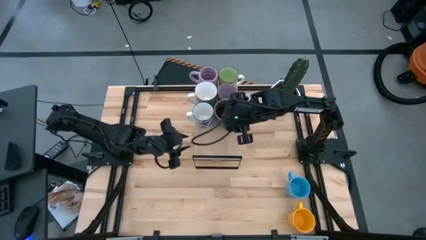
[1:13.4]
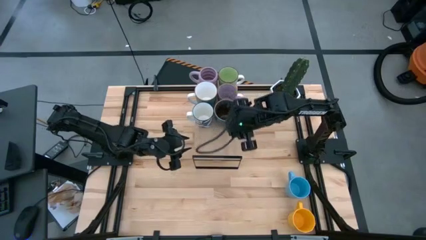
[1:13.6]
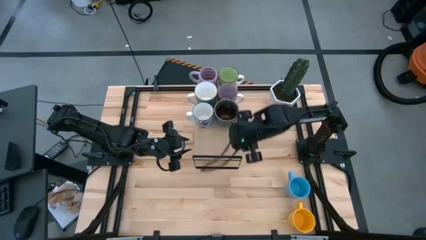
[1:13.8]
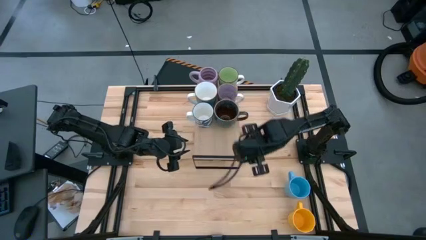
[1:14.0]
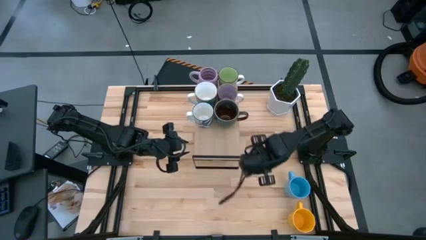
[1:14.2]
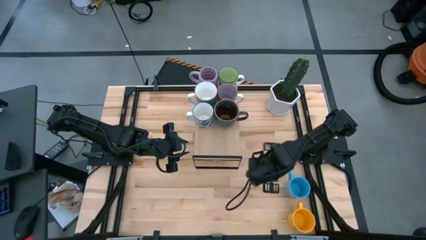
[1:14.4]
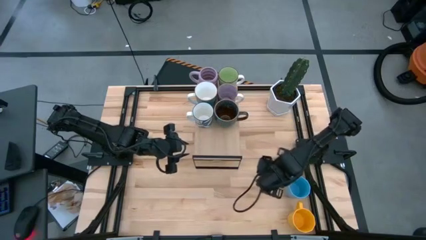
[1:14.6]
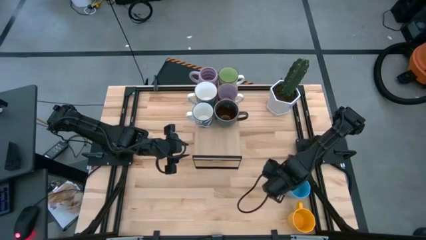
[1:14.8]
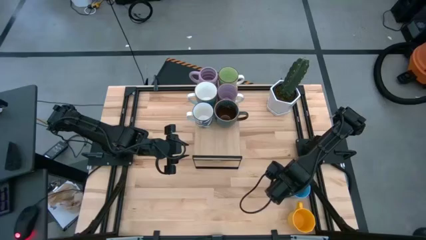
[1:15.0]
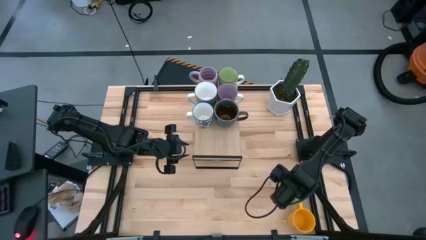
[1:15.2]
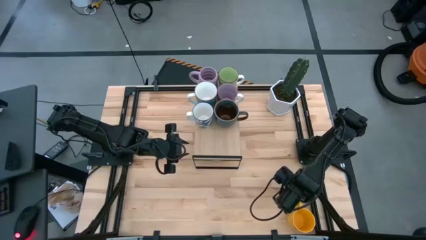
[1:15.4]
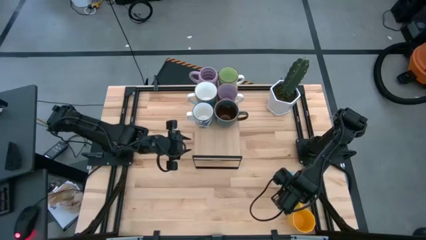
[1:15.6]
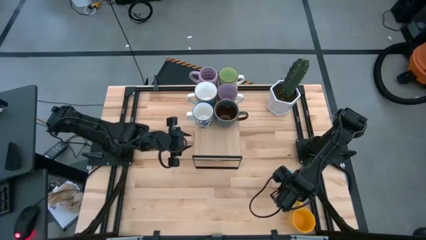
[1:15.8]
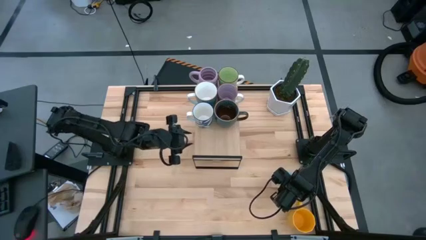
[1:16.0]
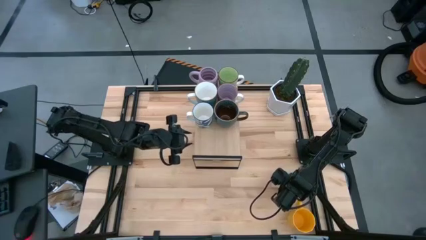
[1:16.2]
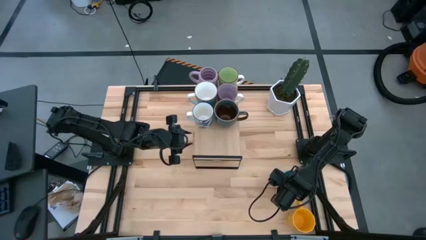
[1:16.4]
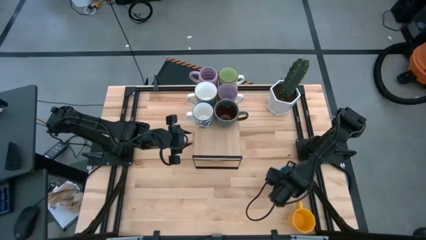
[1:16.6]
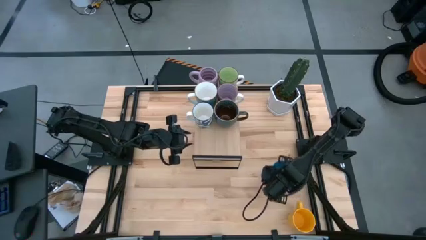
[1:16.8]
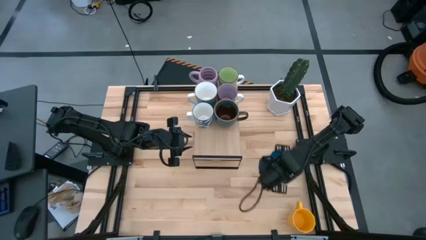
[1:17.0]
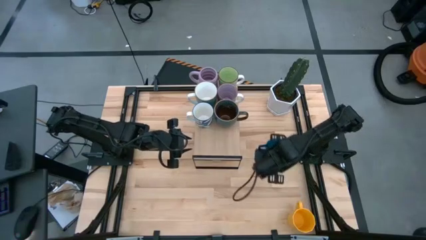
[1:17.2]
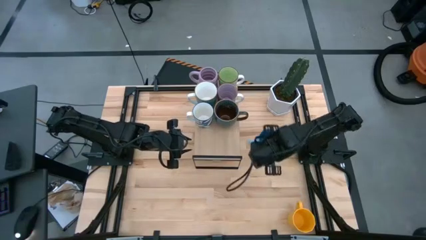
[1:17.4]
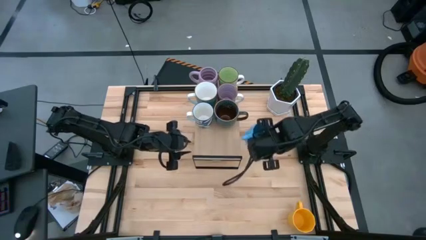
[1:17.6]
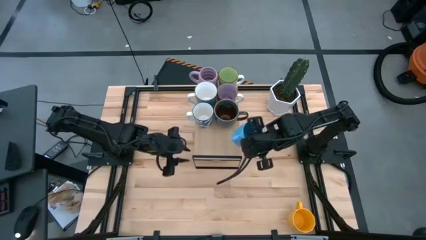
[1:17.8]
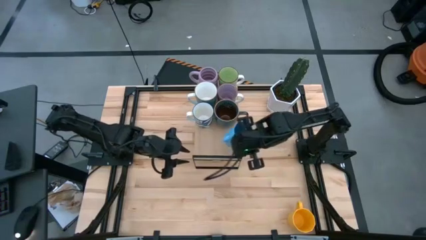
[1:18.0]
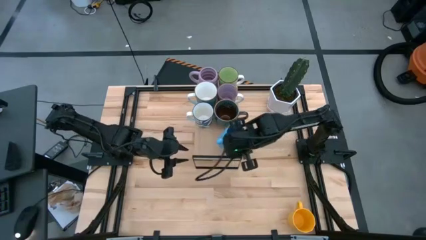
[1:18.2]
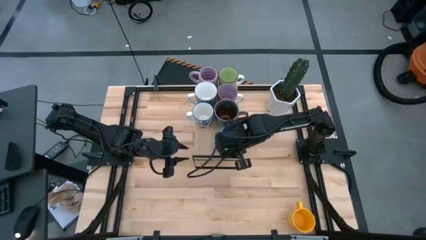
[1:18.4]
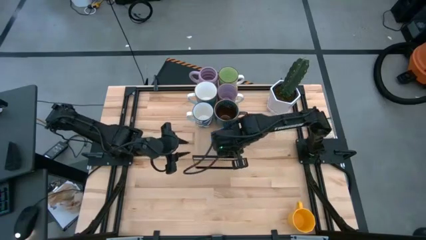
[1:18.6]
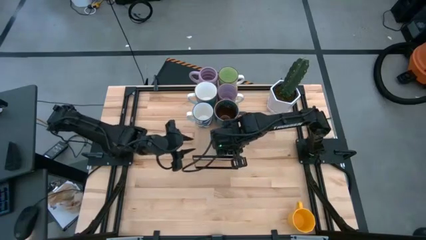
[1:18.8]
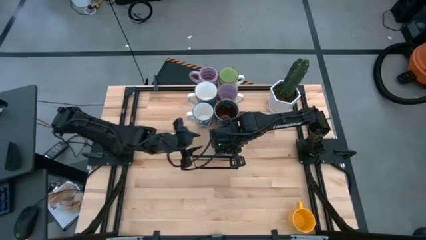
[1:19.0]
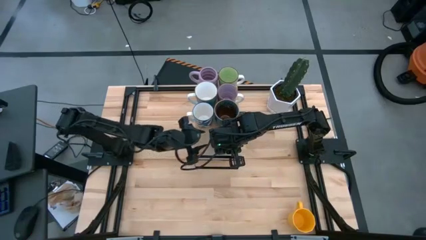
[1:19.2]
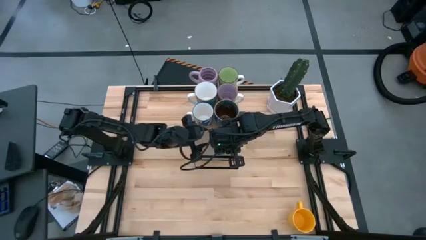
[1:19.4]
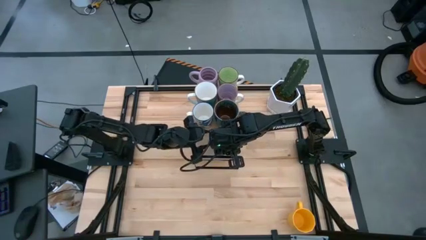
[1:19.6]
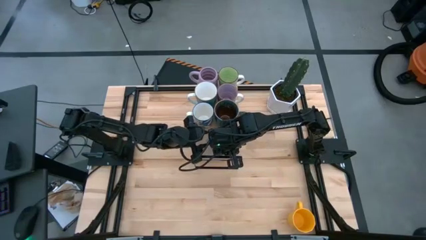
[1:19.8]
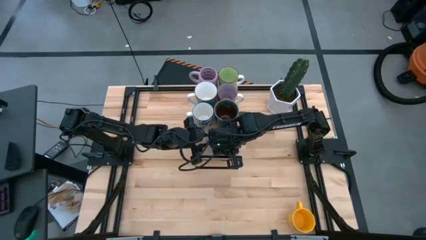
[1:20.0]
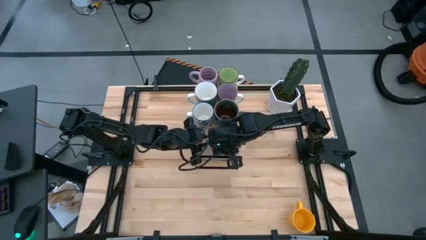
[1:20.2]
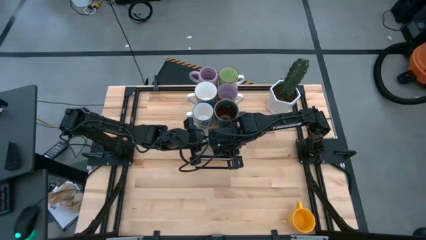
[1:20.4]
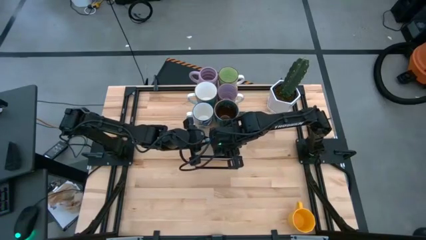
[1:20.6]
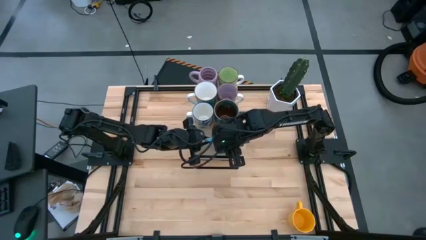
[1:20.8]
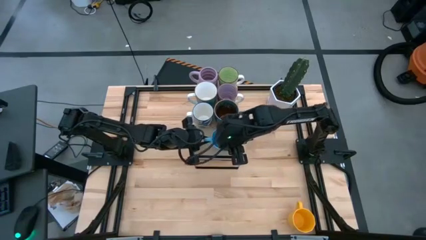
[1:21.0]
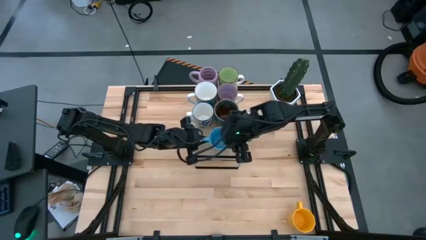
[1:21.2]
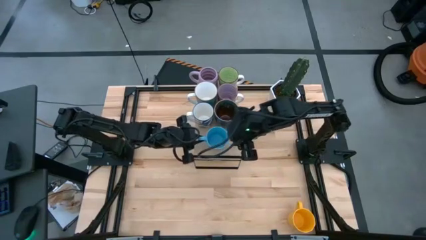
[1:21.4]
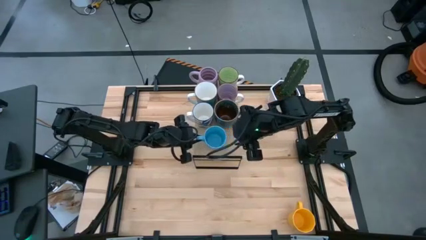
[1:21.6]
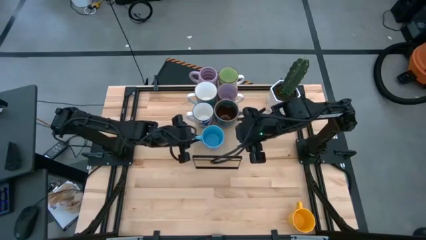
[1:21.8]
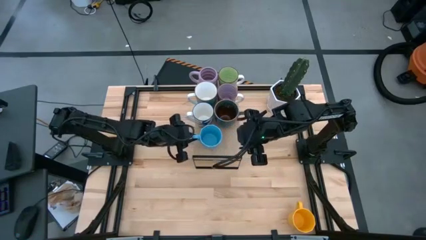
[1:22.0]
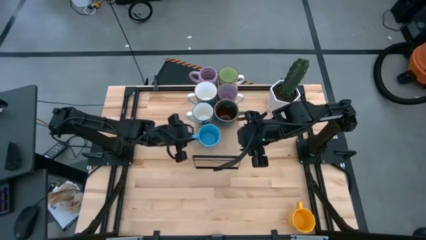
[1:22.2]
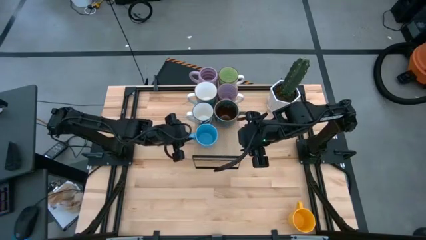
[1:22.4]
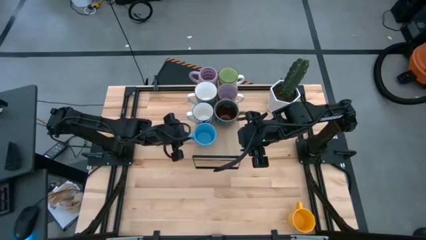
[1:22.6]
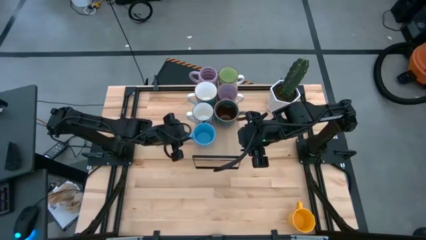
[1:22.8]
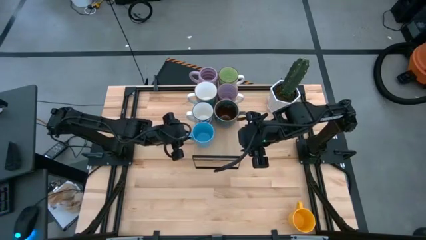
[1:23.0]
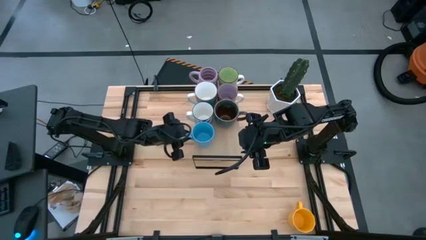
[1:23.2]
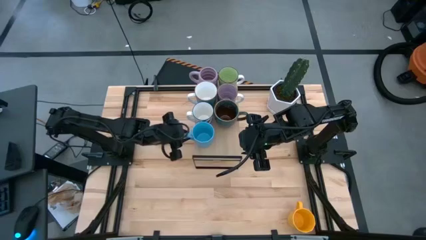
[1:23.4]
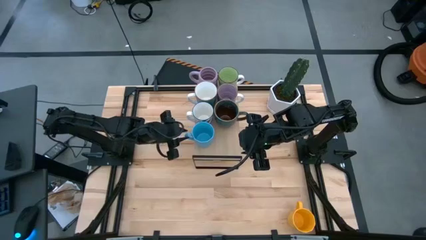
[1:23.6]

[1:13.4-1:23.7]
Task: Place coffee mugs
Put the blue mug on the shelf

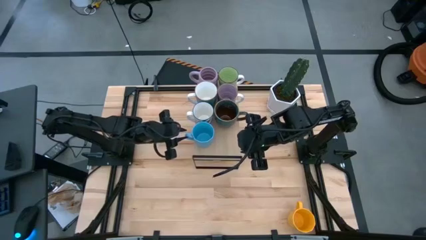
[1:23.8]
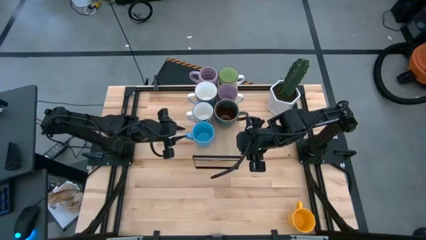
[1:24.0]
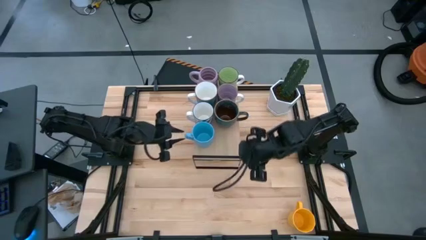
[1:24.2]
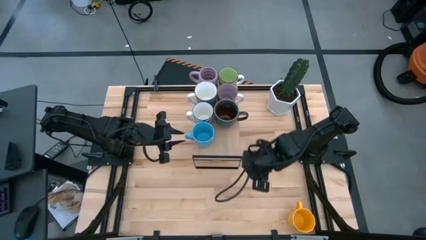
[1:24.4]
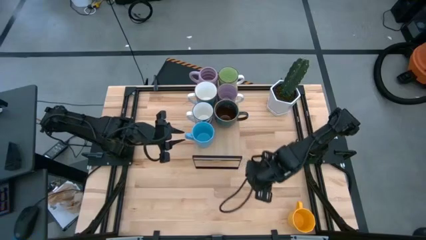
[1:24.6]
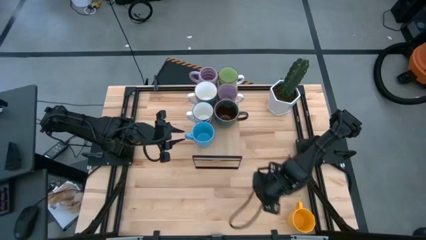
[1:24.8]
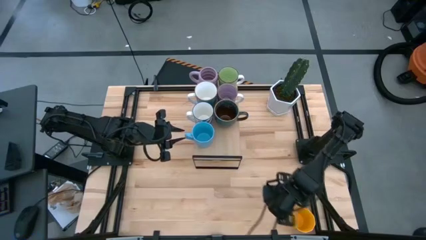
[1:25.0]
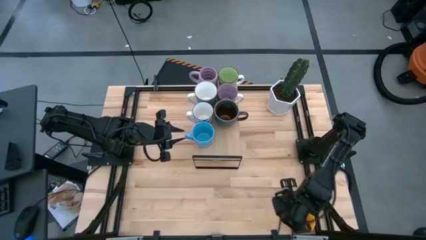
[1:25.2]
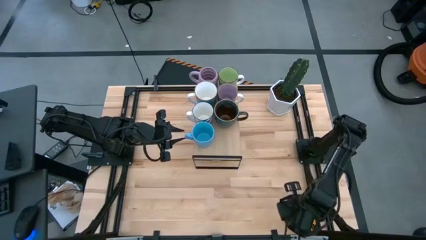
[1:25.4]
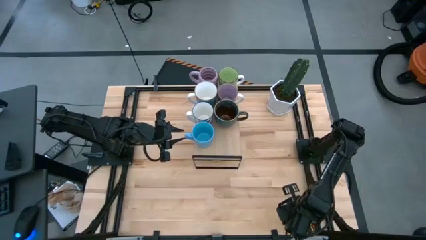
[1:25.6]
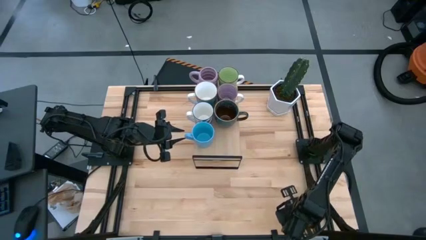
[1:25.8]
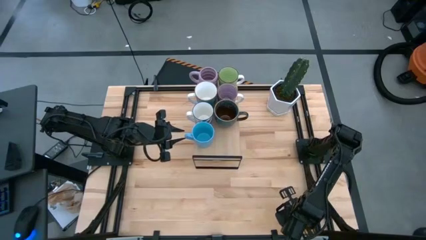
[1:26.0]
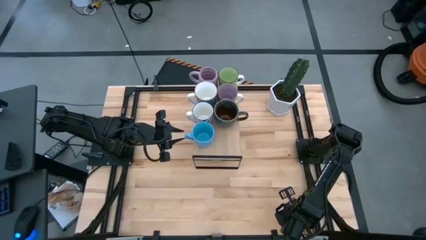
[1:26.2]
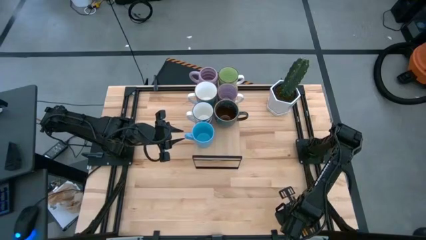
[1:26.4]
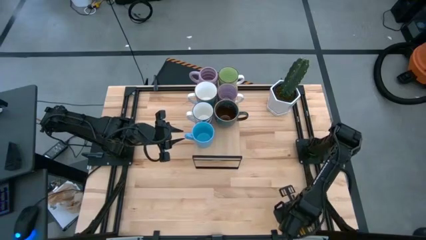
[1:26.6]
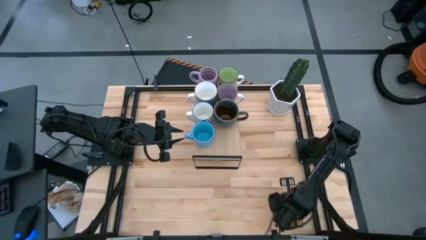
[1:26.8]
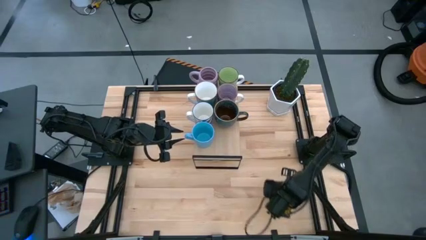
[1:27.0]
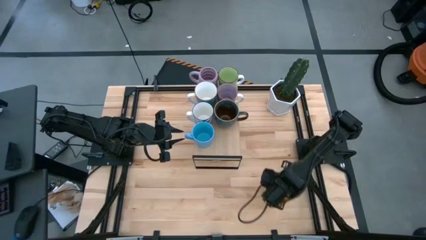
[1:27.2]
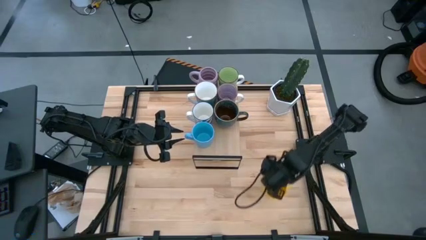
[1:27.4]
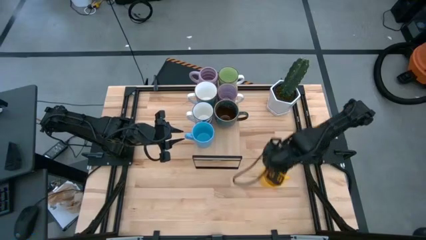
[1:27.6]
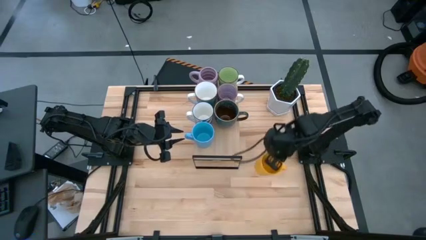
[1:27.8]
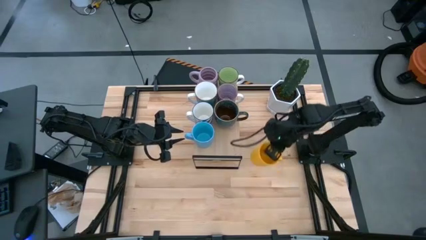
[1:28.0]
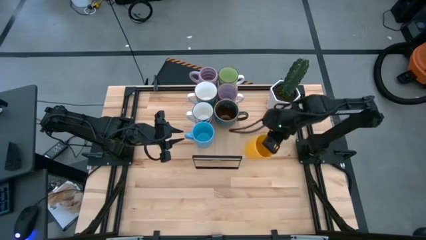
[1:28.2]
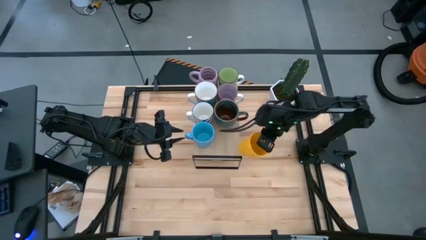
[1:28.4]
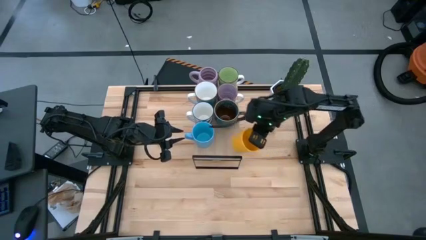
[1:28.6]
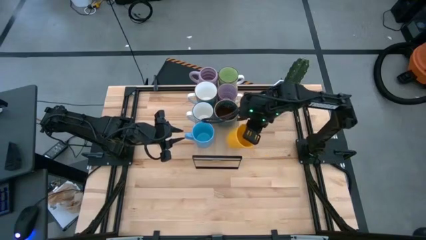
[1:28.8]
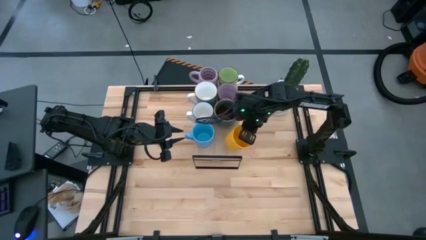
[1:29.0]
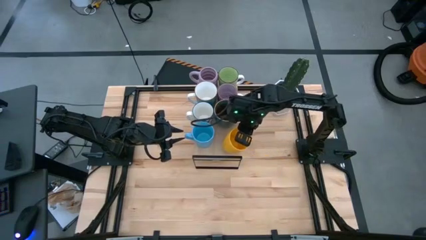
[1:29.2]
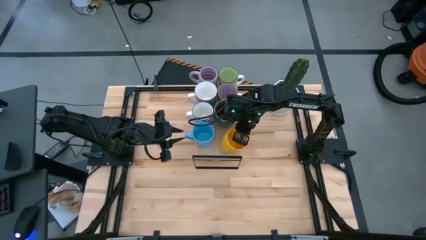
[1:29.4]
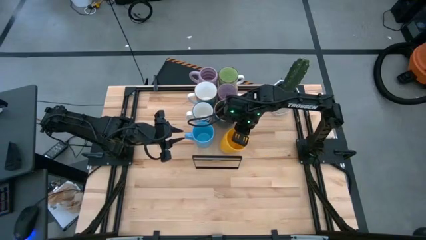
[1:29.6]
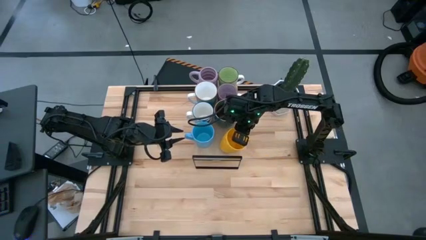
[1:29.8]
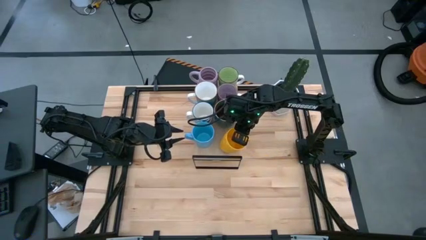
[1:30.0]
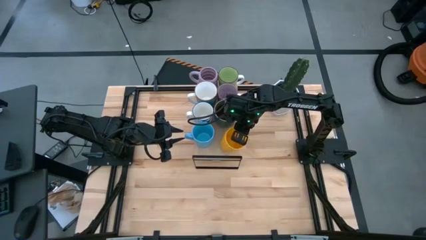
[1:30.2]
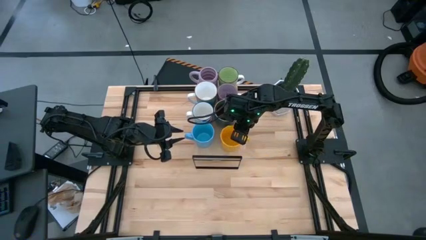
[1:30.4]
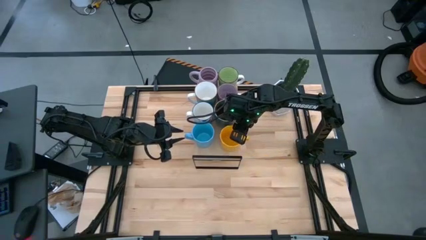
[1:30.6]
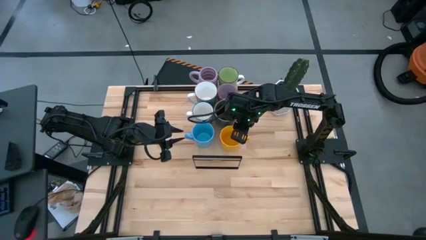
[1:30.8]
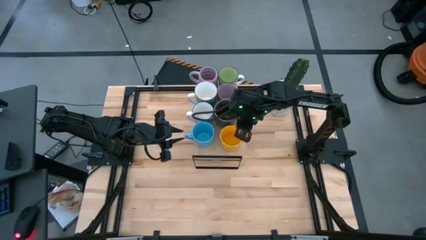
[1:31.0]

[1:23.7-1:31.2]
Put the yellow mug on the shelf
